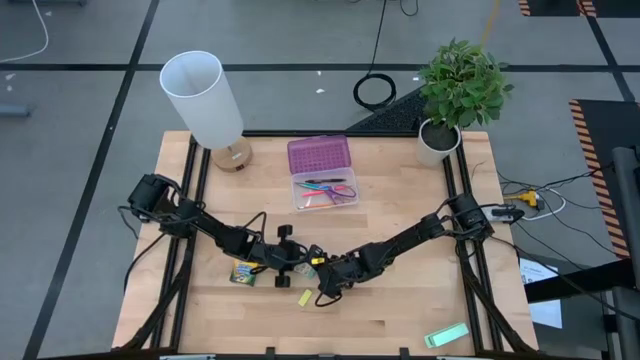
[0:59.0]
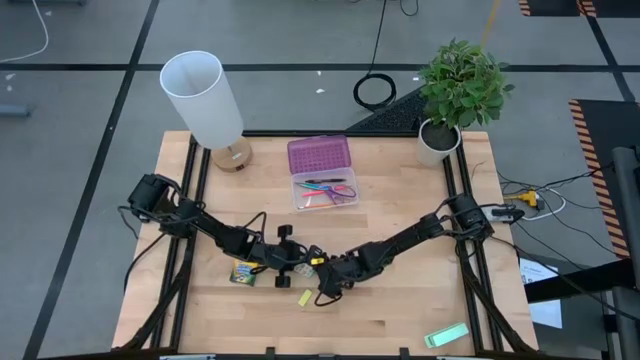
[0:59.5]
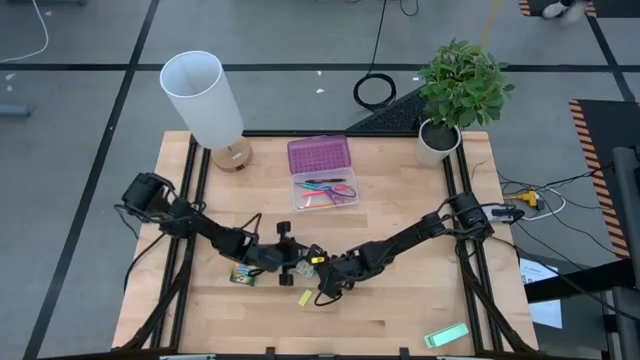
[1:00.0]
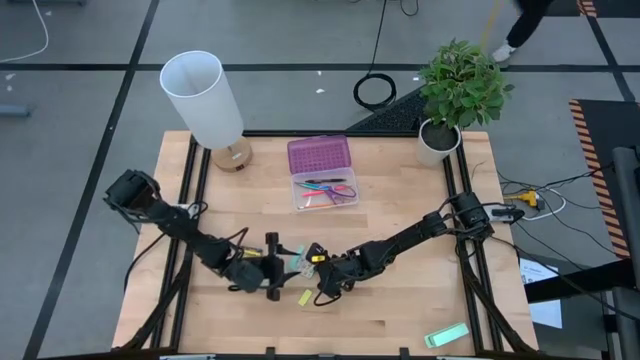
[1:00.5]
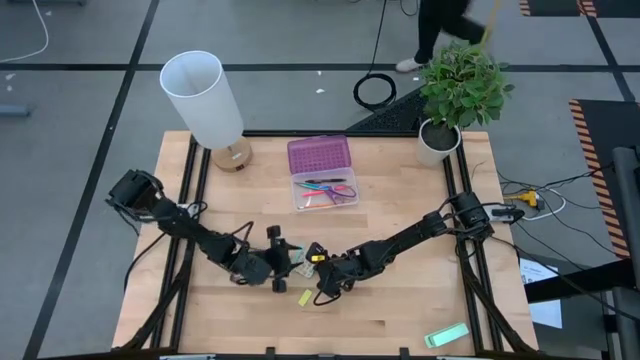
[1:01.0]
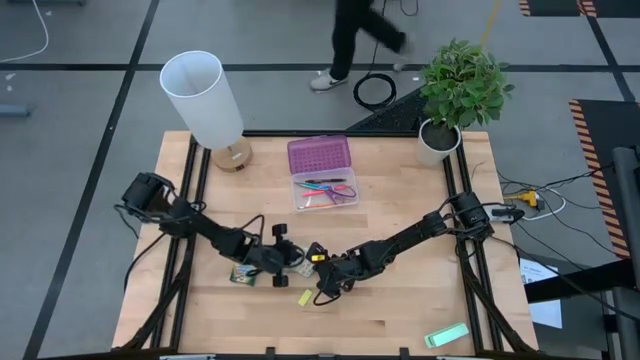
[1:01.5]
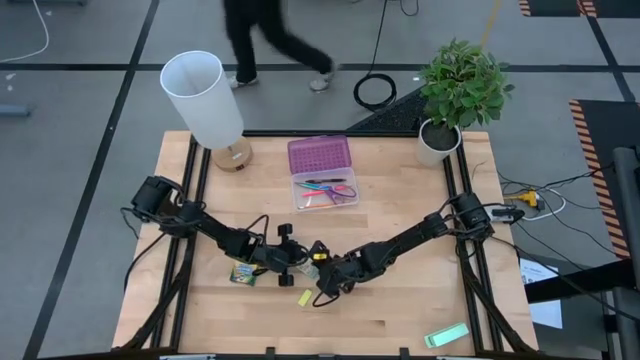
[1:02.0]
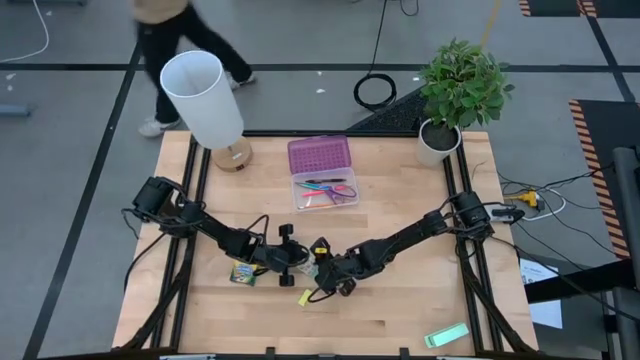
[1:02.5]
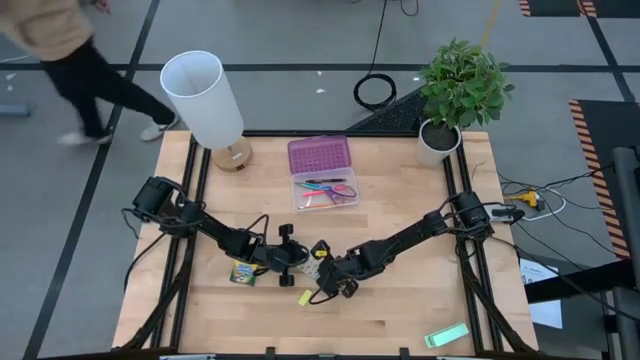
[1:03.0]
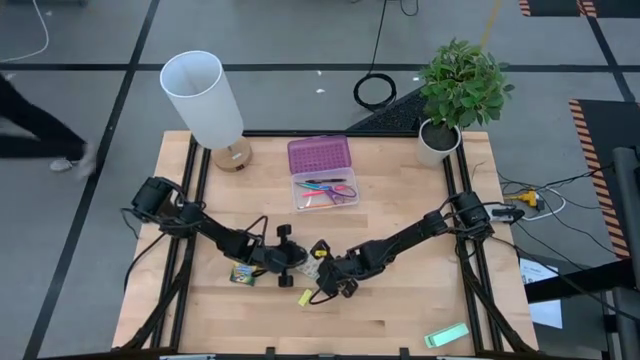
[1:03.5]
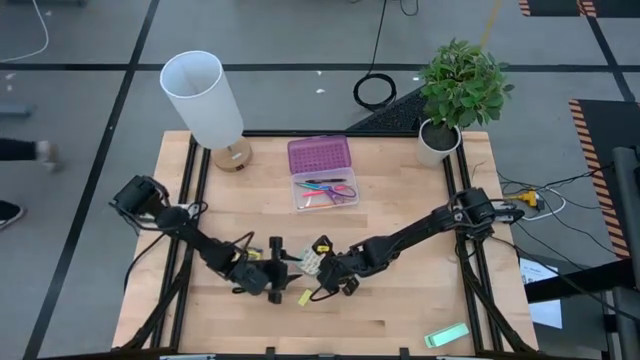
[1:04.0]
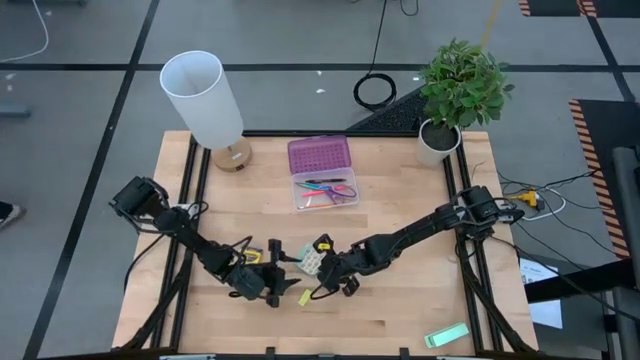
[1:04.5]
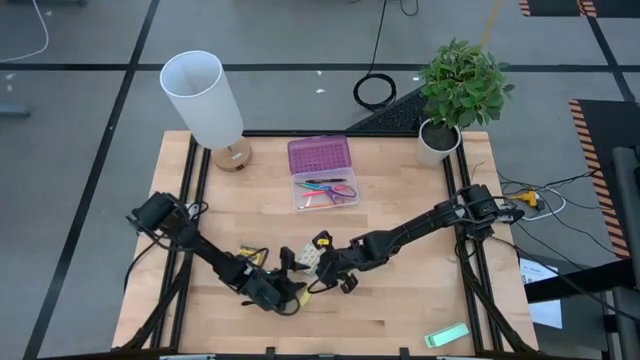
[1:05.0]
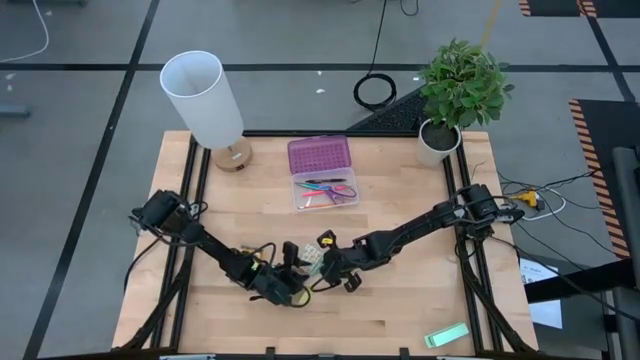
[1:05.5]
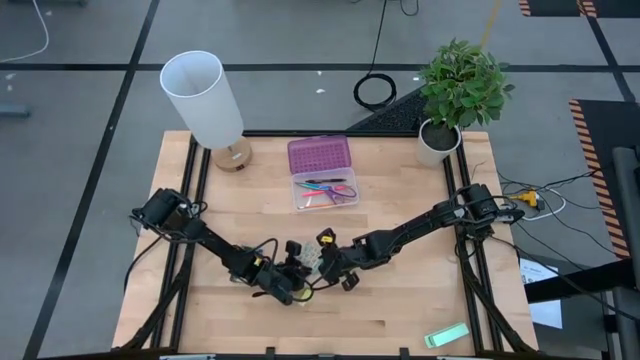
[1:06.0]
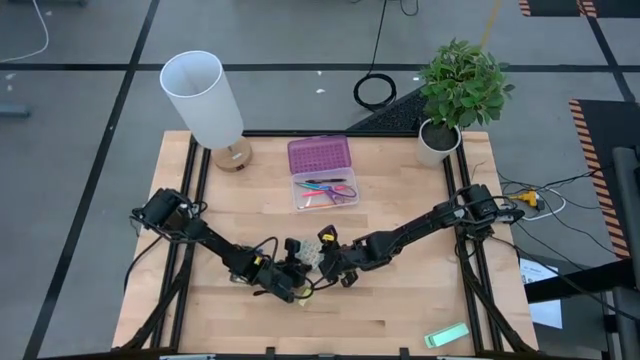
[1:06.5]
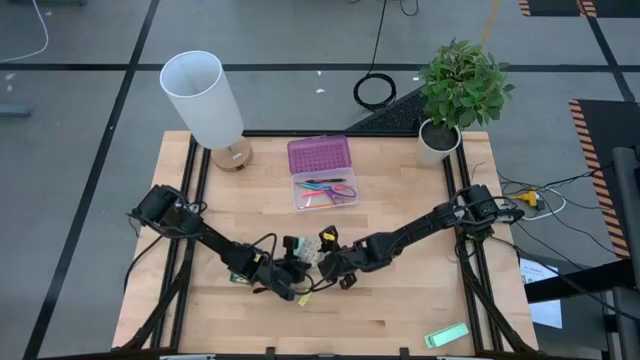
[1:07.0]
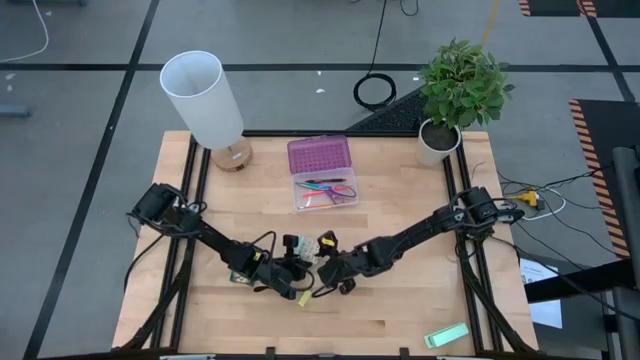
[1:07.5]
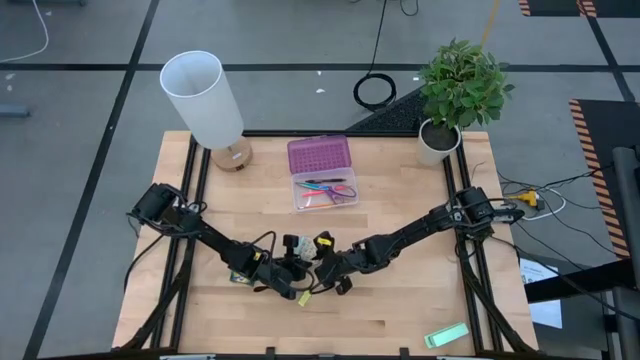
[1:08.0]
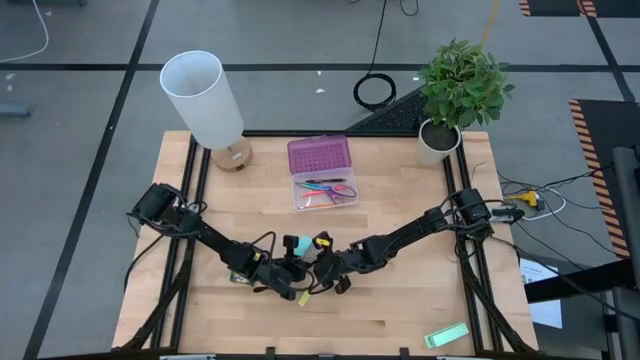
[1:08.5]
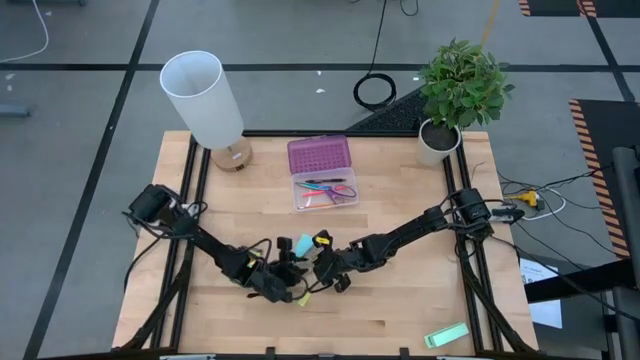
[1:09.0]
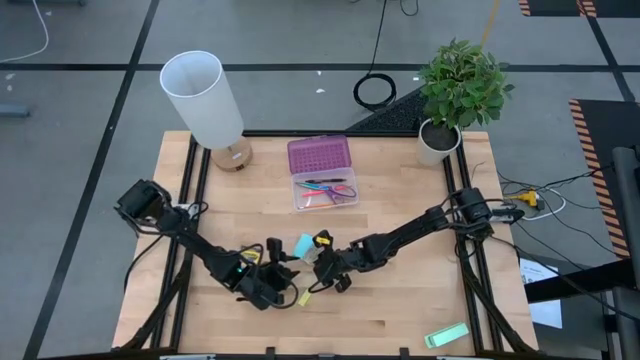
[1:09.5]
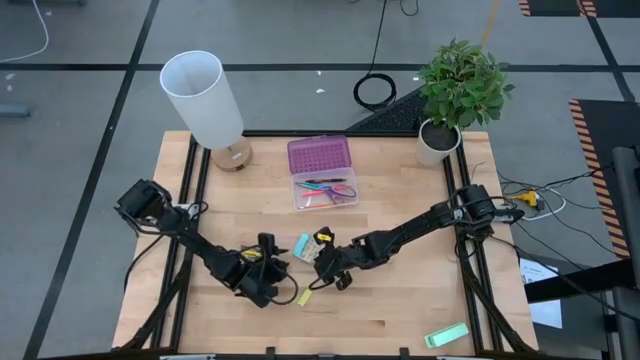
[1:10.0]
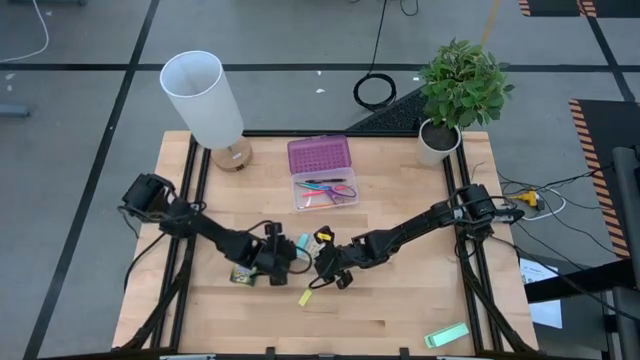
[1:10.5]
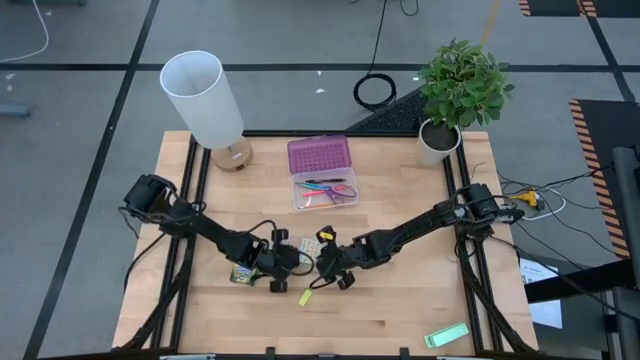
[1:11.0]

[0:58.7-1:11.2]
Task: Pack school essentials
Put the blue sticky notes into the purple supply box

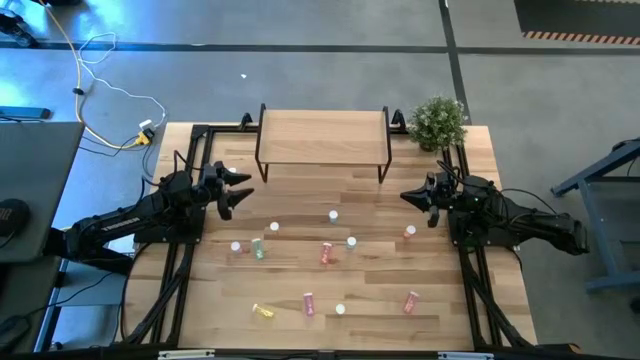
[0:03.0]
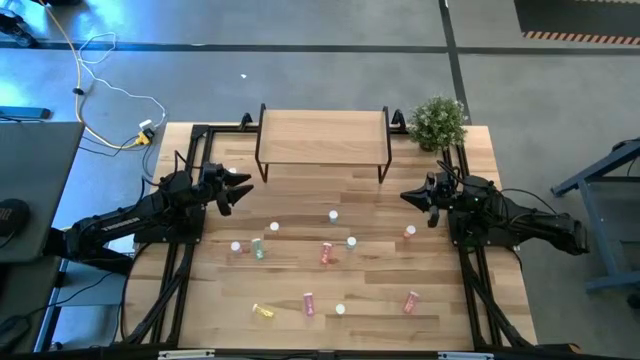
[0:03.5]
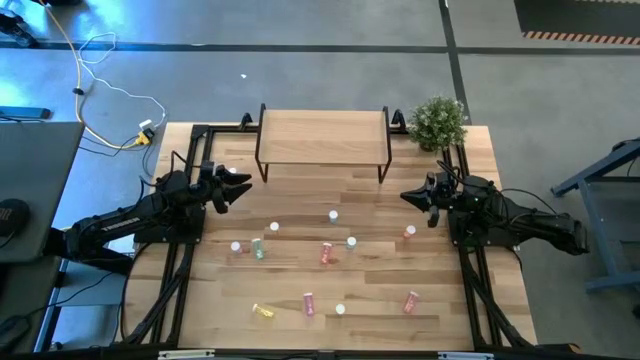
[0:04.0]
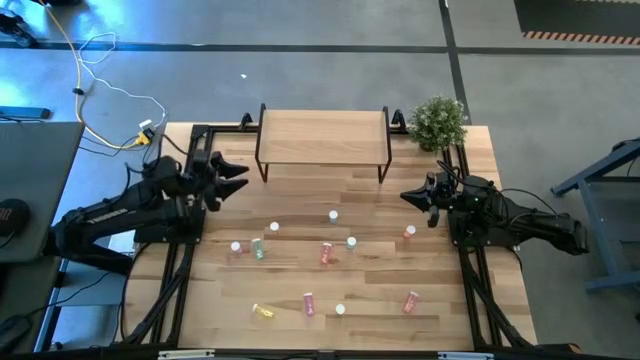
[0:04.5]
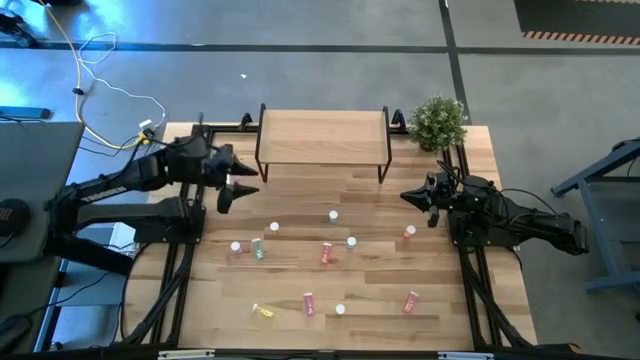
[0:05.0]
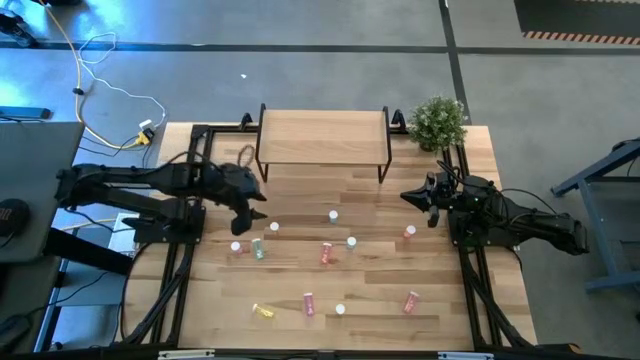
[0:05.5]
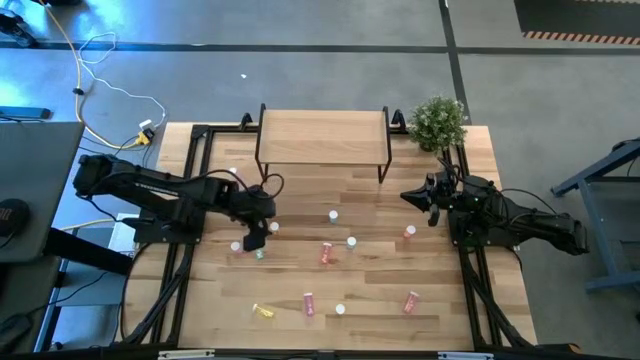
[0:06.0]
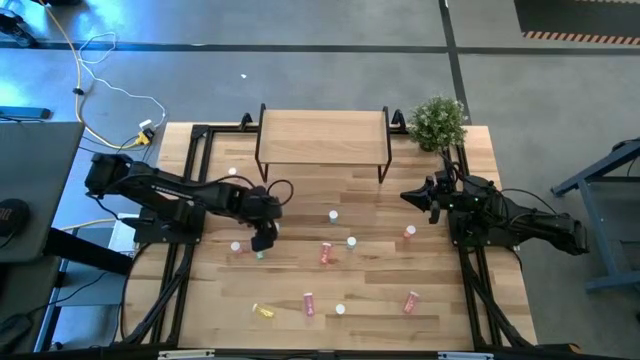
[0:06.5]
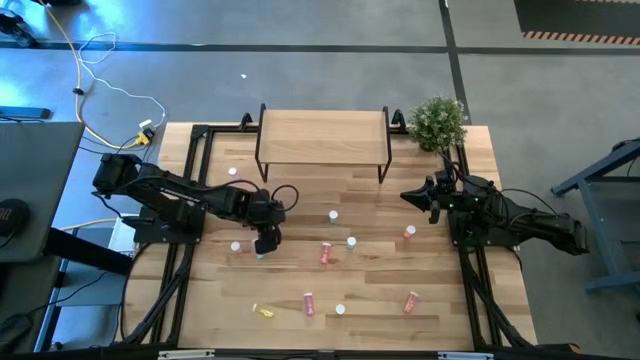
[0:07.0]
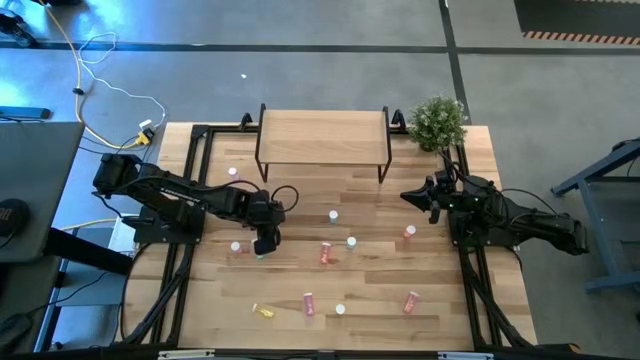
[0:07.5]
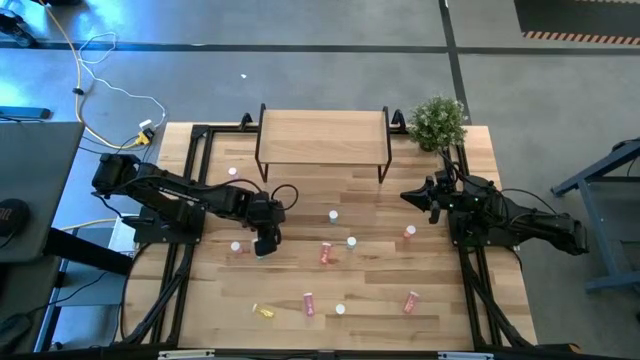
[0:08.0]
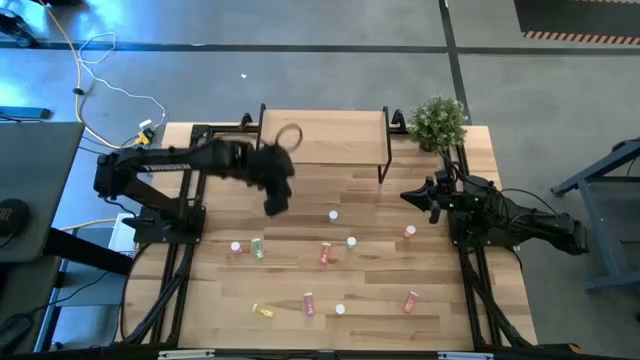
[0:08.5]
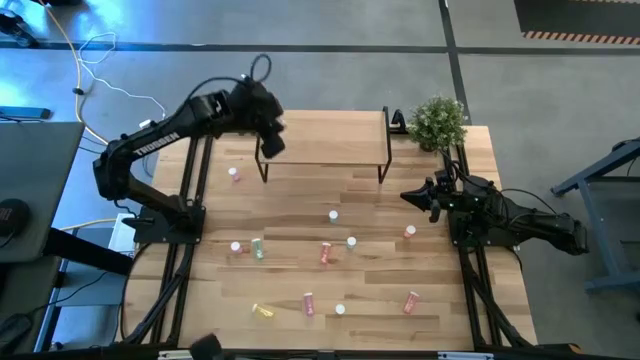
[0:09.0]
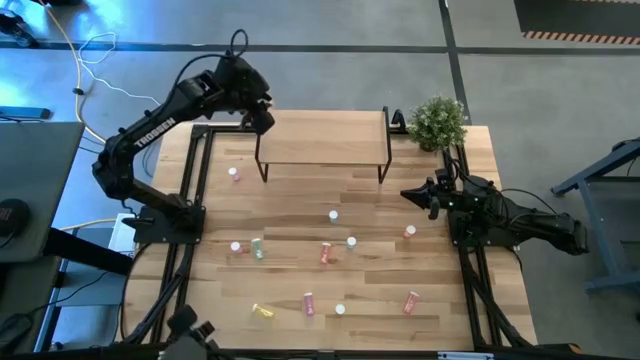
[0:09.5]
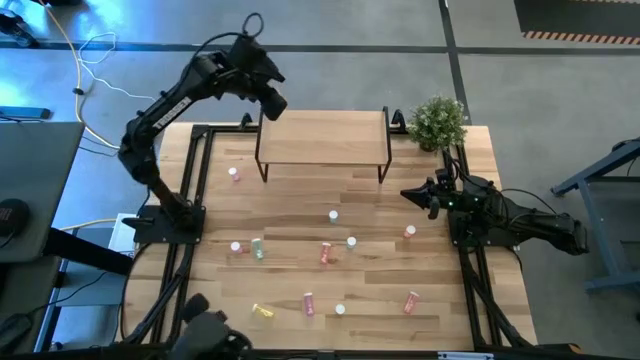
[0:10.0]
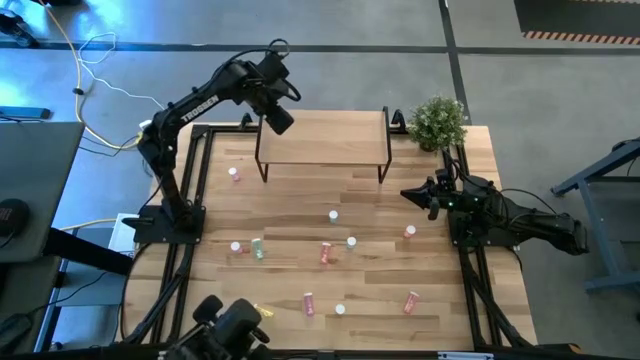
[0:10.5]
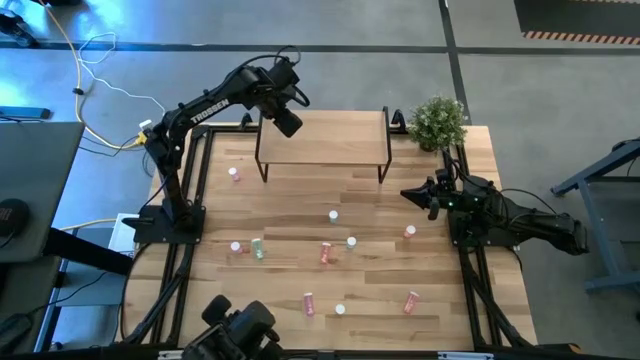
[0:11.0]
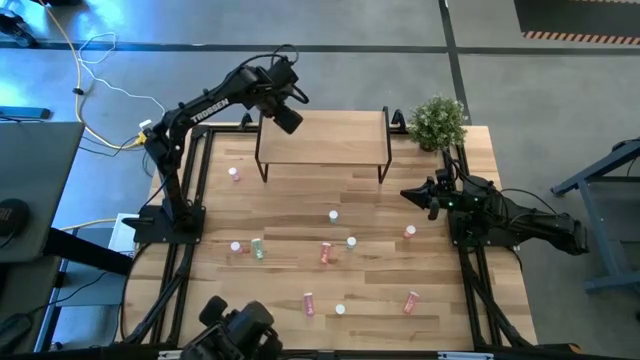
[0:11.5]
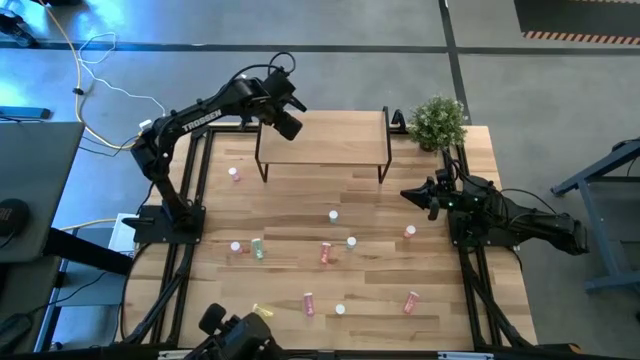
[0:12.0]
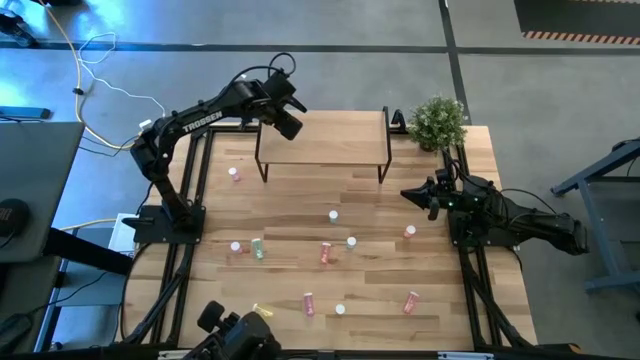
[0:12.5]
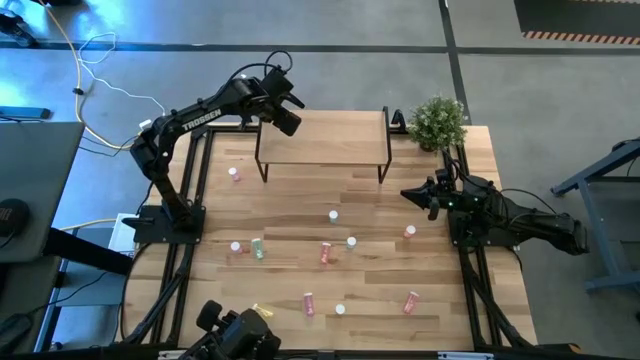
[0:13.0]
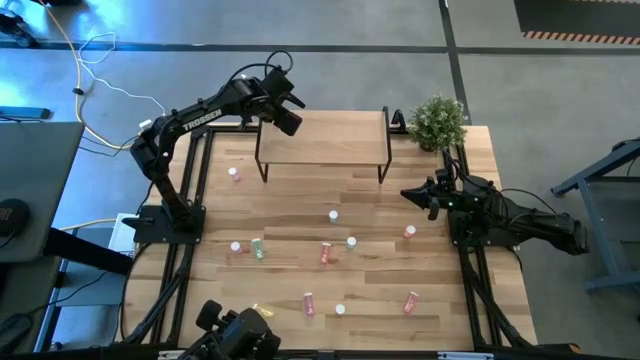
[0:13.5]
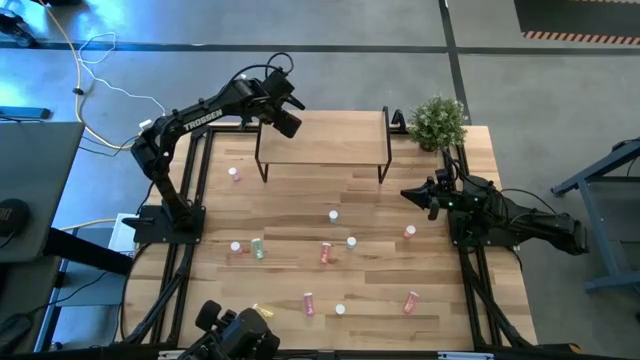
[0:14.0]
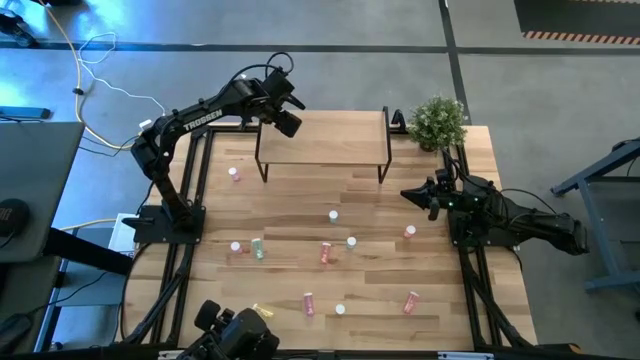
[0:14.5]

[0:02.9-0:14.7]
Task: Pick and place medicine bottles onto shelf by color
Put the top yellow pill bottle on the shelf
